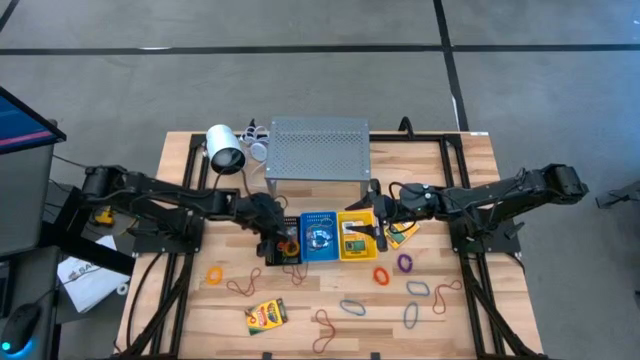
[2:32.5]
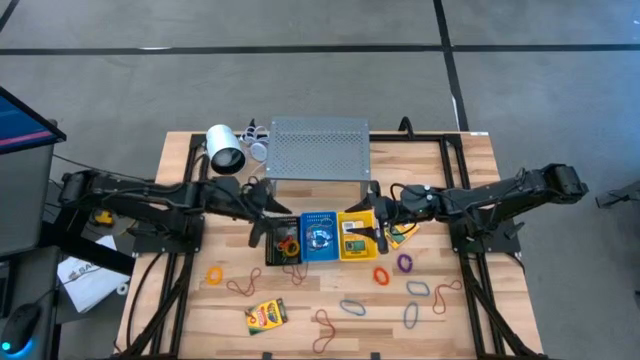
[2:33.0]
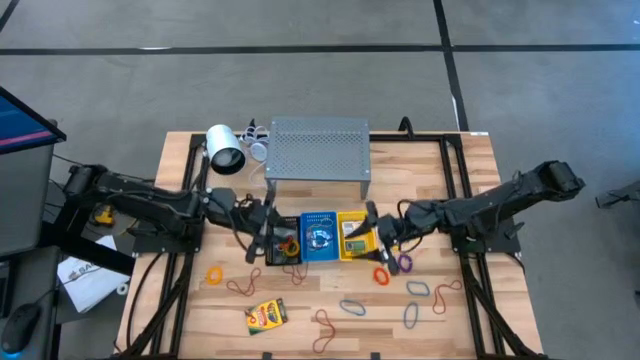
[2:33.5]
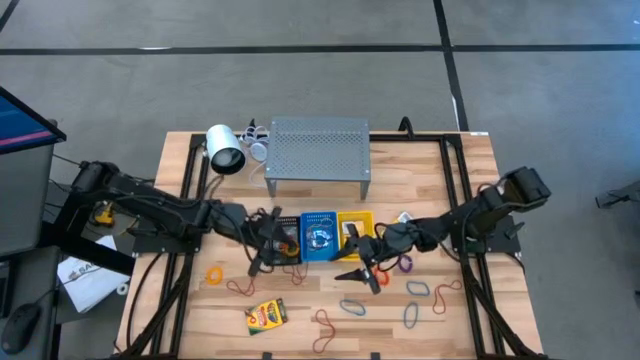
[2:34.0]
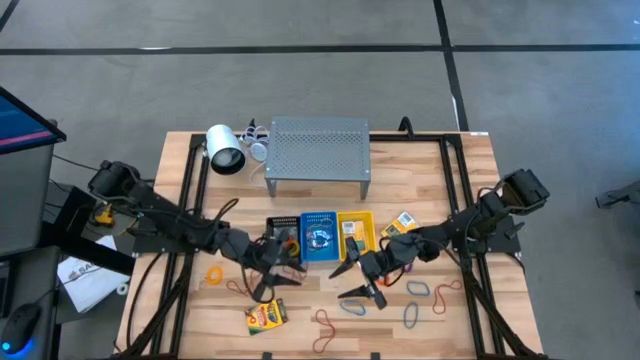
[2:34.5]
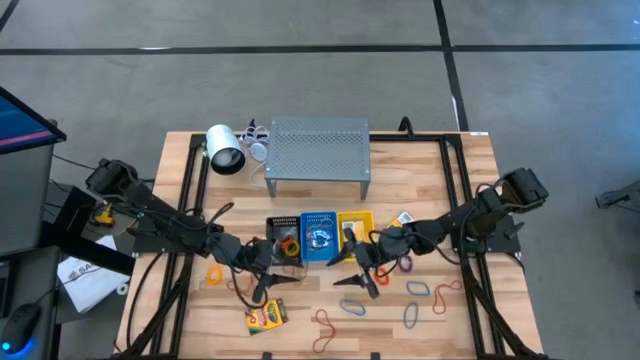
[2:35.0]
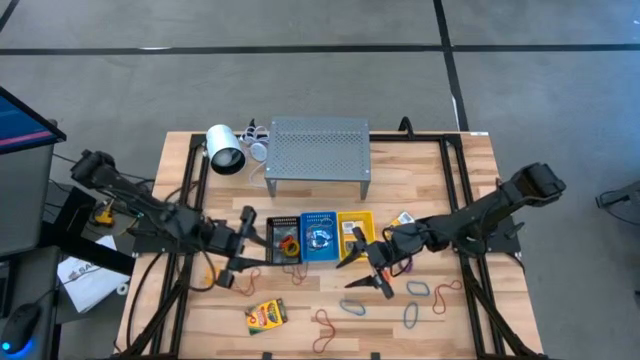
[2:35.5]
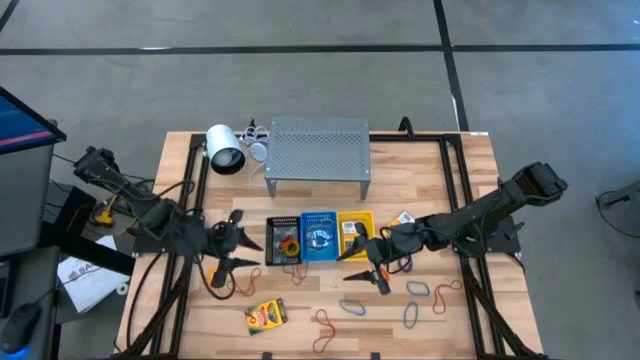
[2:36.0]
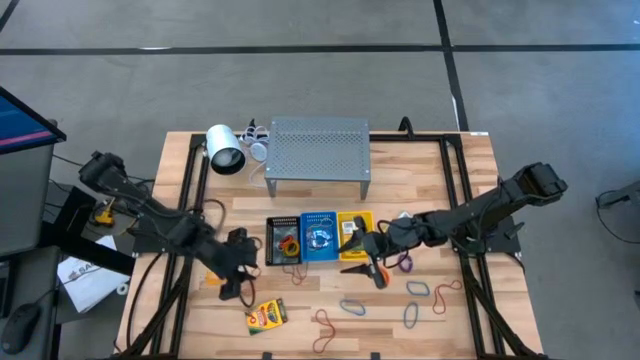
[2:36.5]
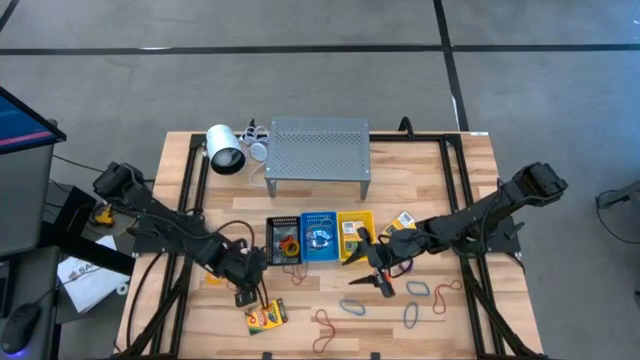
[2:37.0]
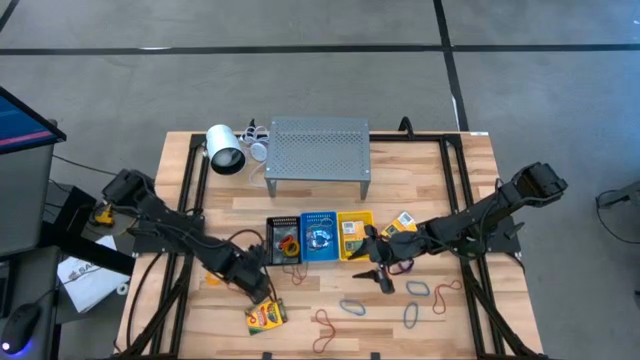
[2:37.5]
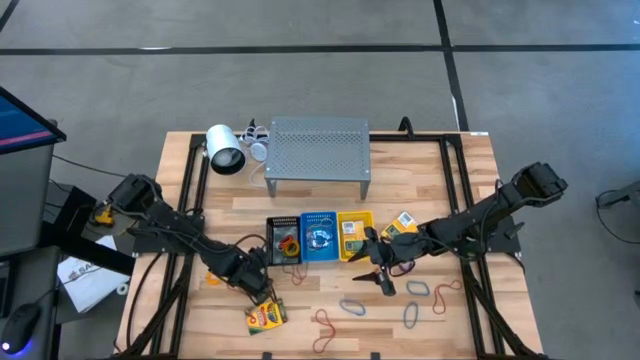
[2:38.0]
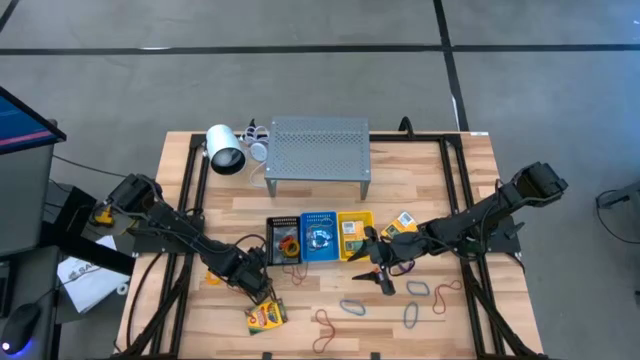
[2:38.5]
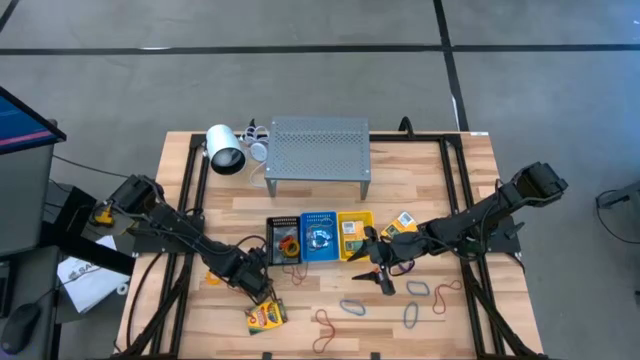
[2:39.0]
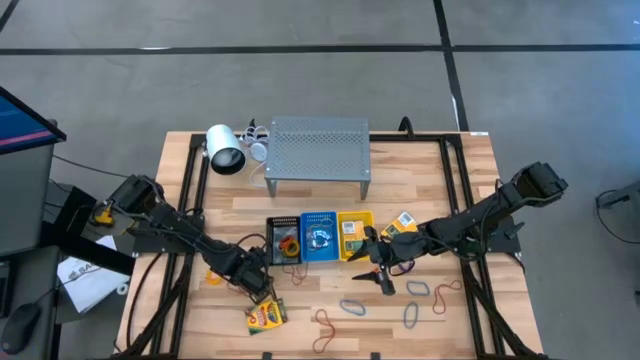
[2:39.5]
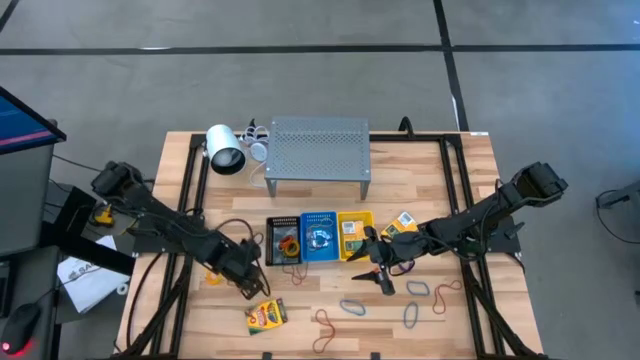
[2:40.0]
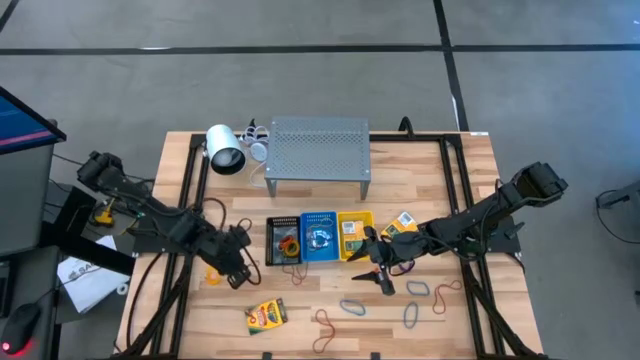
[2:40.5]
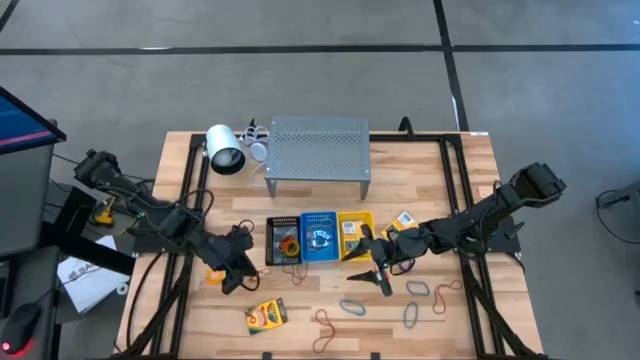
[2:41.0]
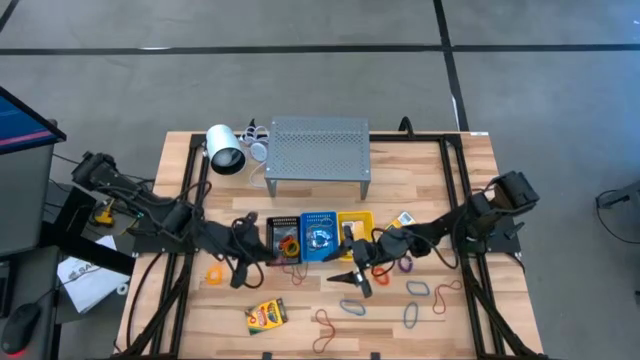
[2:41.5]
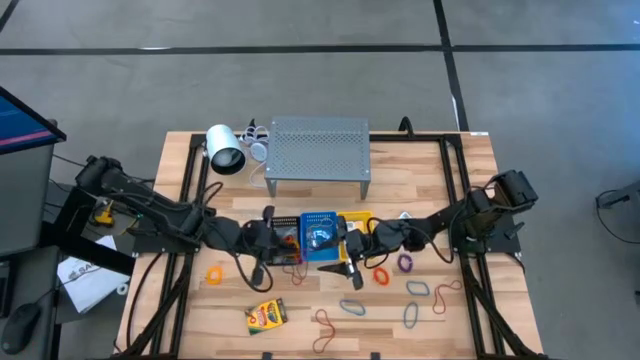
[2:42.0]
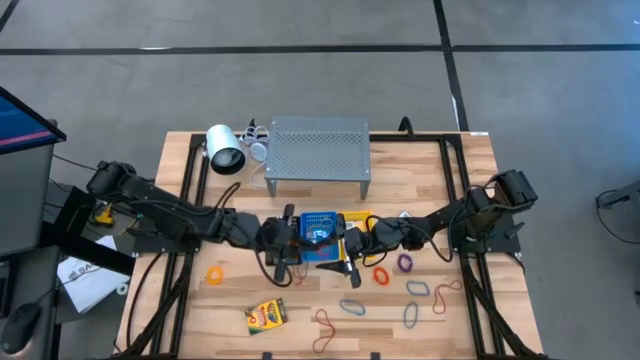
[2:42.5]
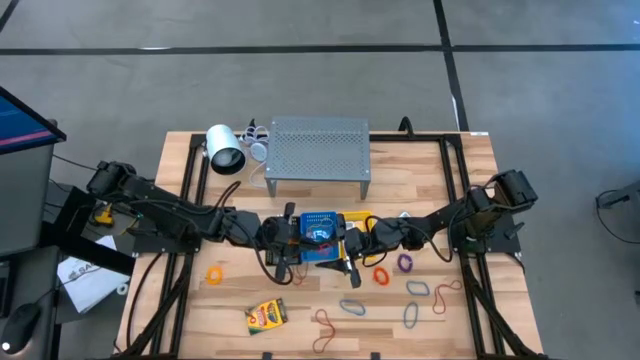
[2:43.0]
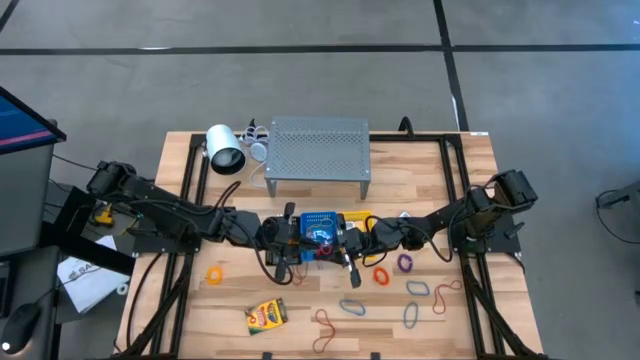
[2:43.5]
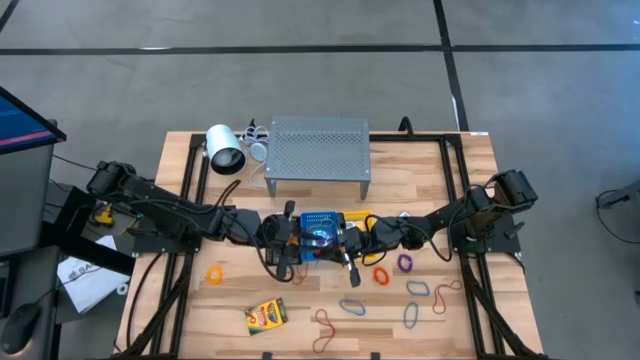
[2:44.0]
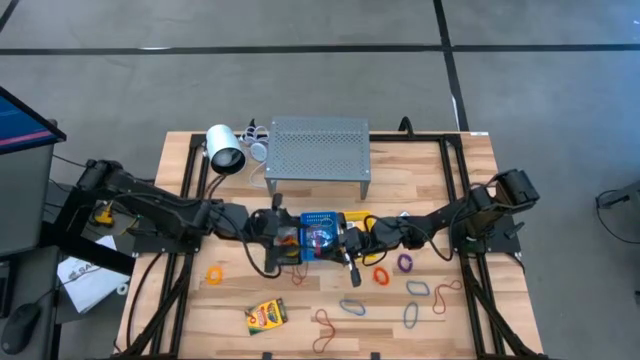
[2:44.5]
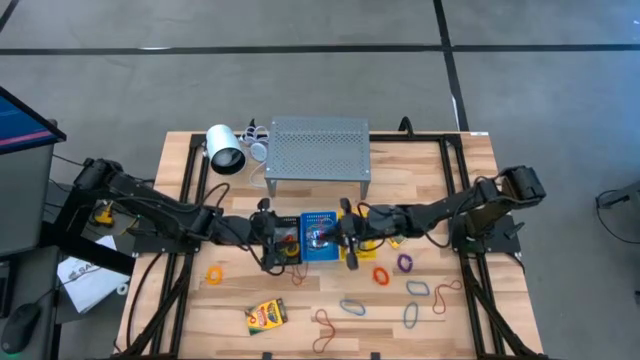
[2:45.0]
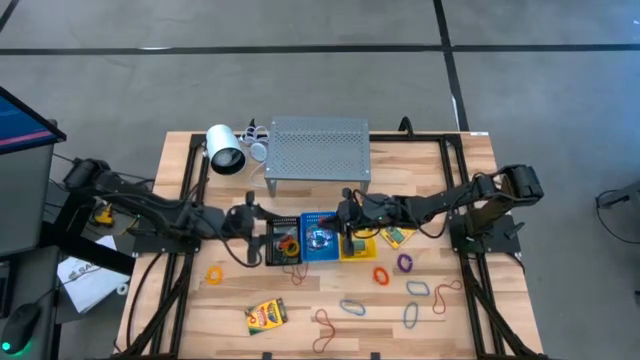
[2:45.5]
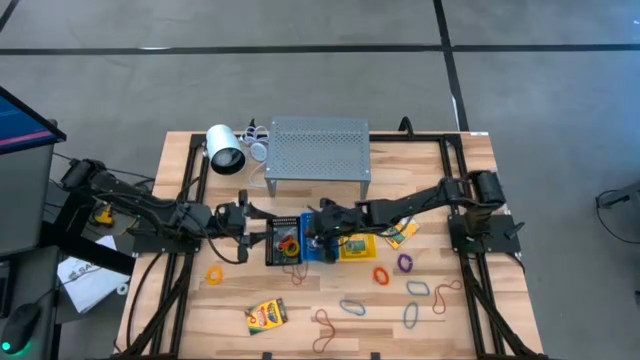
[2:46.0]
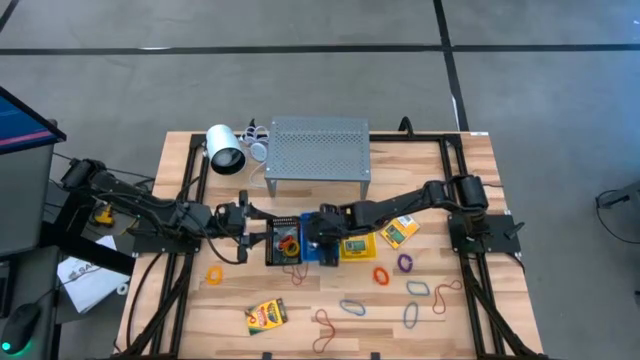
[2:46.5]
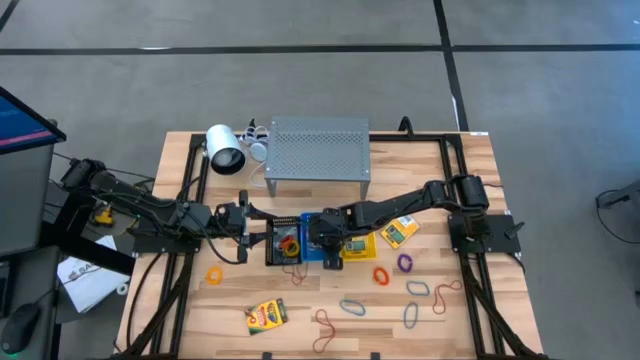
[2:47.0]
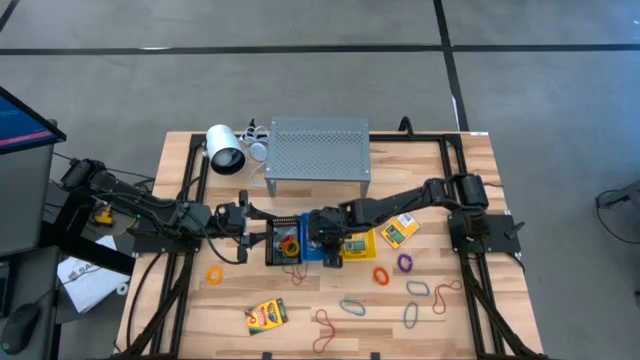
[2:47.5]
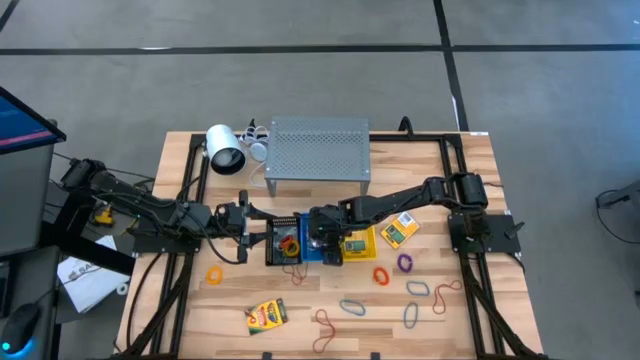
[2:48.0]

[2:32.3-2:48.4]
Task: Pick & Place Office Desk Supplies
Put the red rubber band into the blue basket

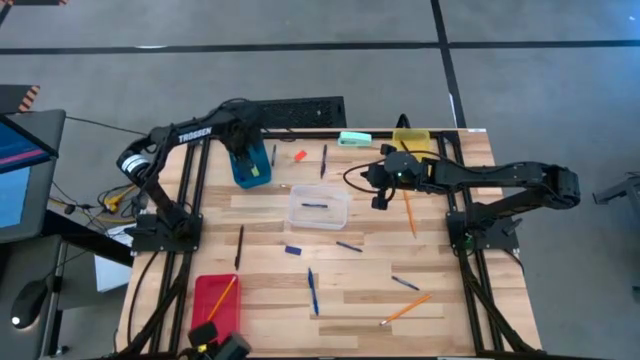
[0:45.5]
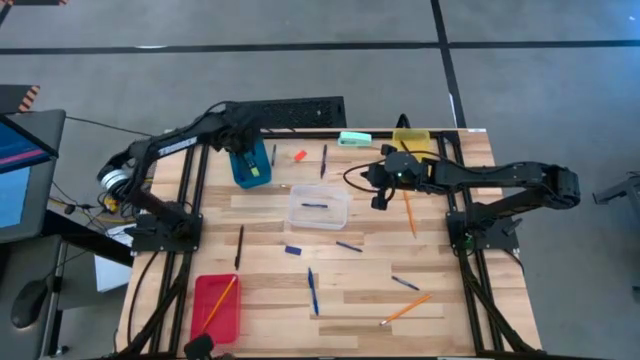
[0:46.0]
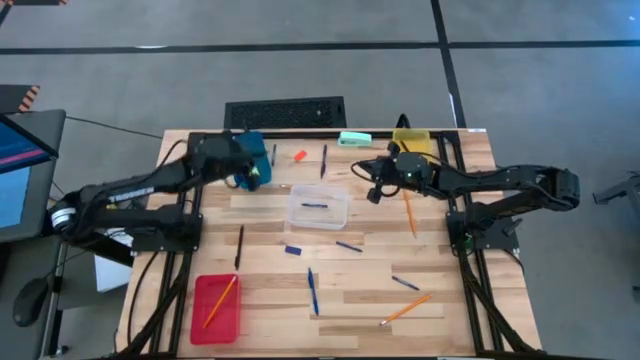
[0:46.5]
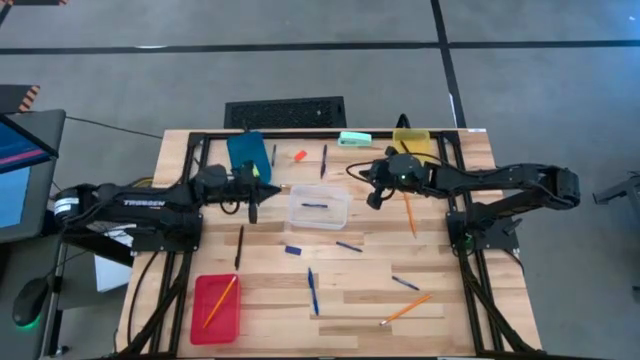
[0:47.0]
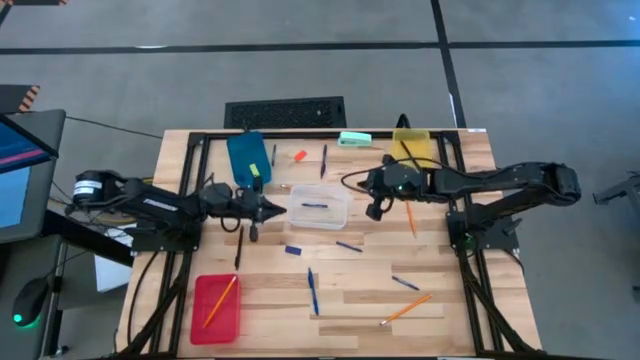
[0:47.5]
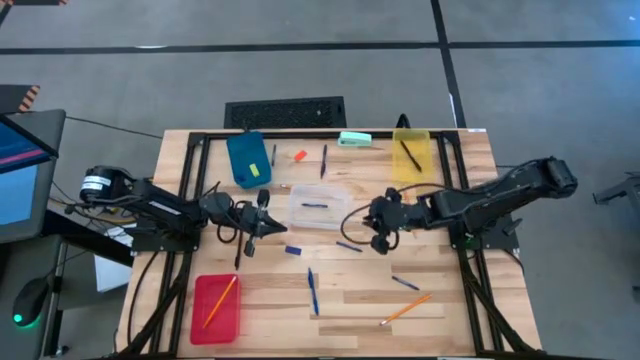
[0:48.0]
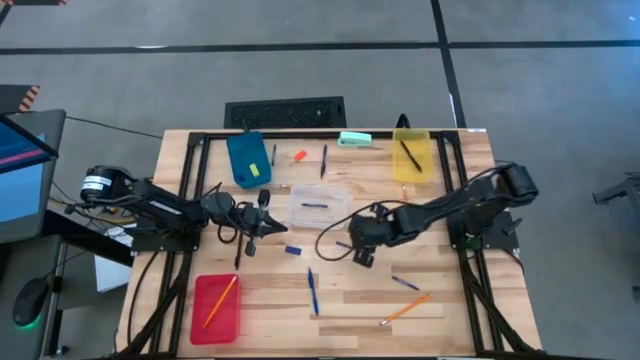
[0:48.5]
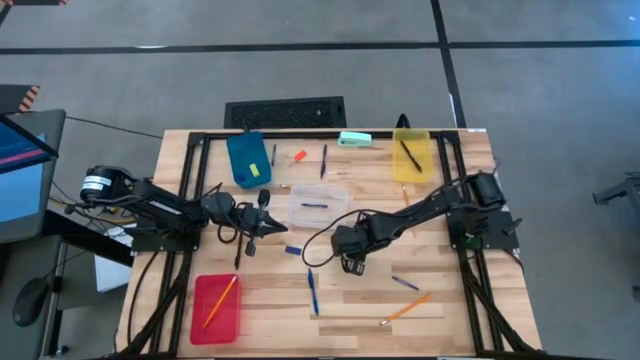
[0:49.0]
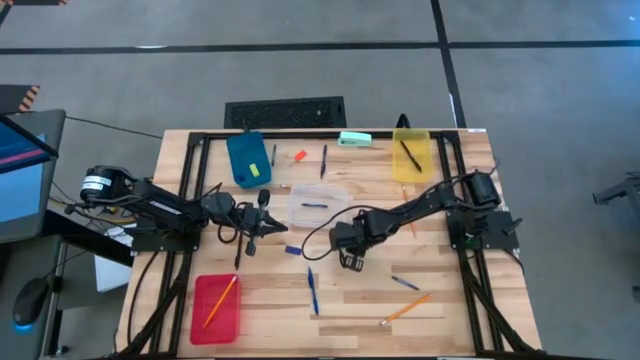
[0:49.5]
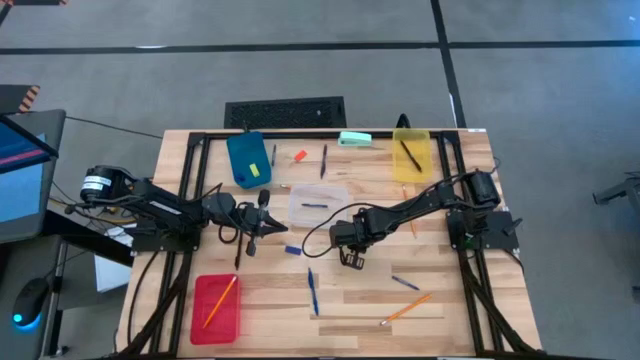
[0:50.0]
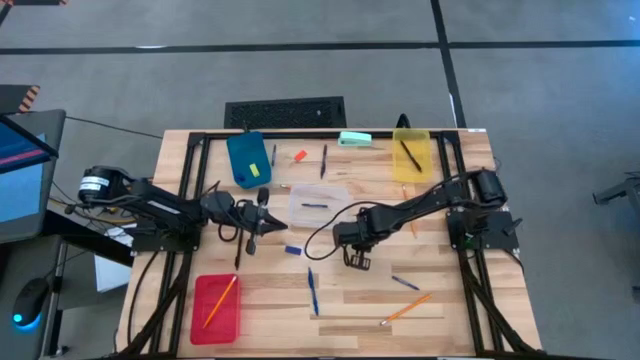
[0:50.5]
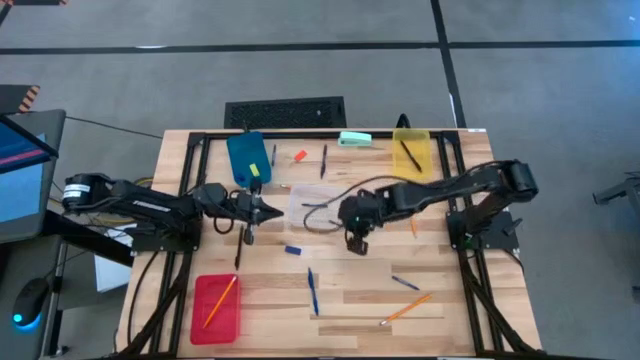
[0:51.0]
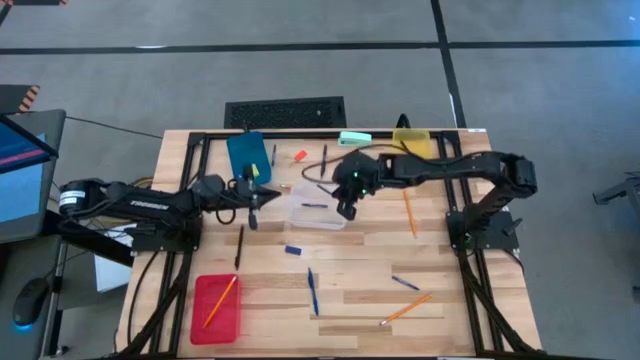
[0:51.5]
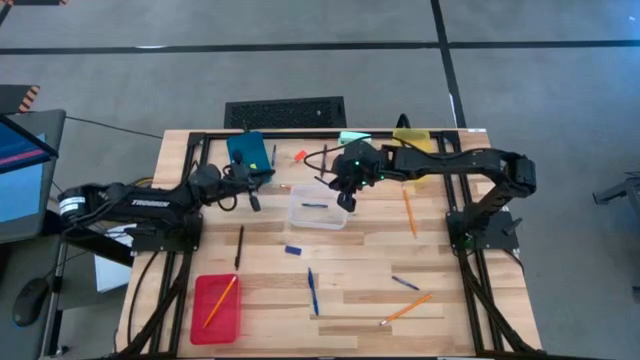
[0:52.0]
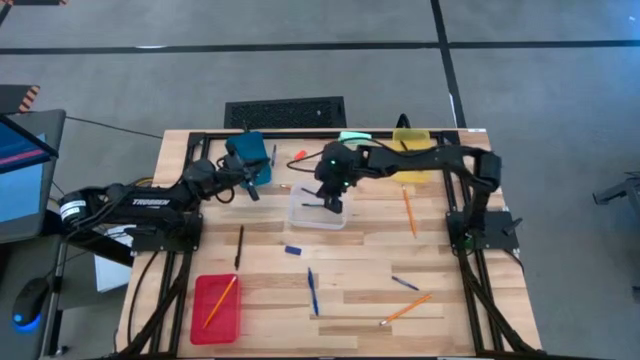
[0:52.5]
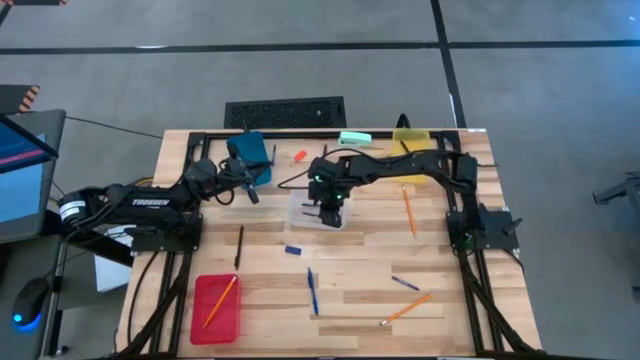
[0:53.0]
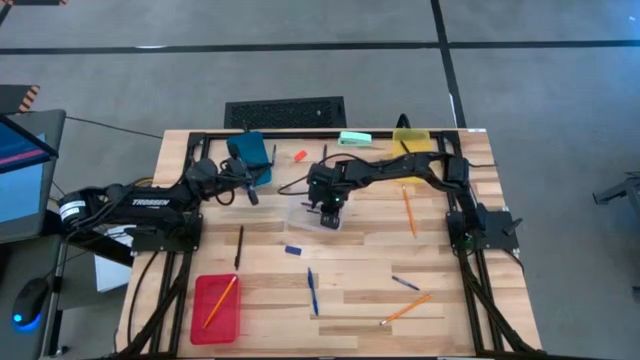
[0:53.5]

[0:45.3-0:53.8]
Task: Sort crayons/erasers/pens/pencils in bins
Put the middle blue crayon into the transparent bin
